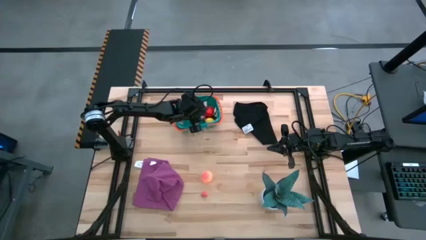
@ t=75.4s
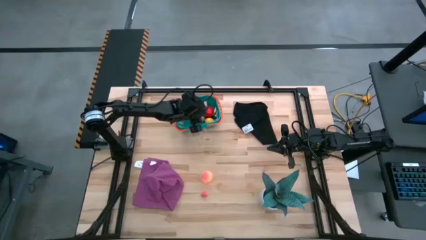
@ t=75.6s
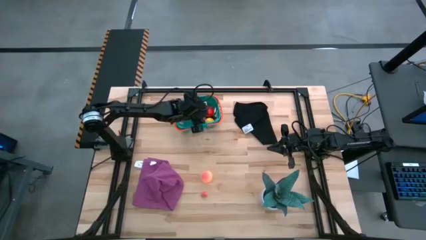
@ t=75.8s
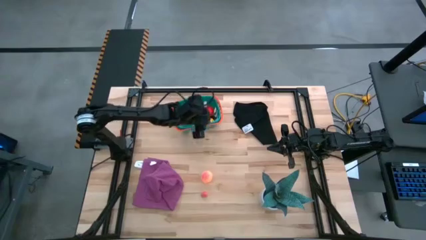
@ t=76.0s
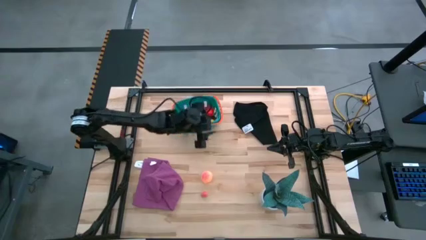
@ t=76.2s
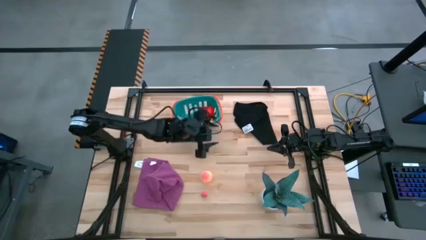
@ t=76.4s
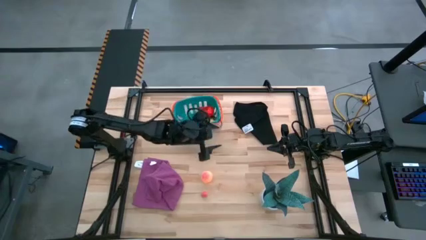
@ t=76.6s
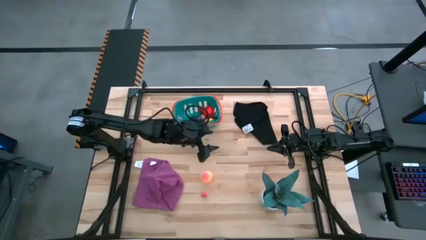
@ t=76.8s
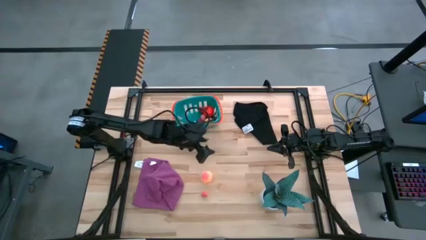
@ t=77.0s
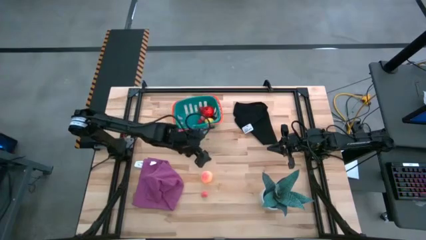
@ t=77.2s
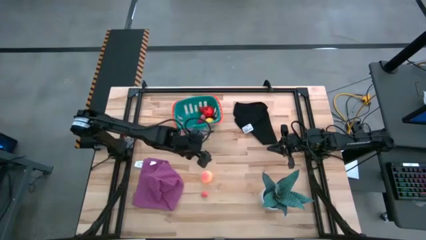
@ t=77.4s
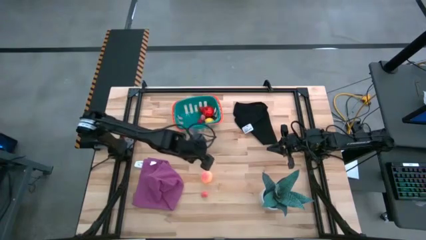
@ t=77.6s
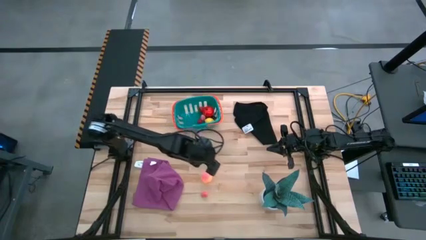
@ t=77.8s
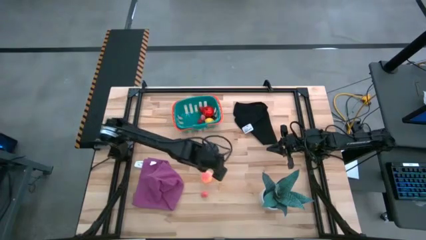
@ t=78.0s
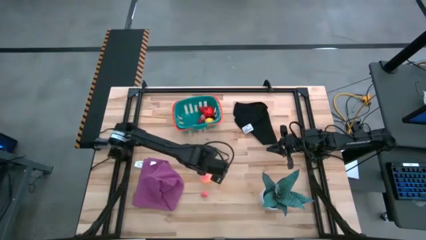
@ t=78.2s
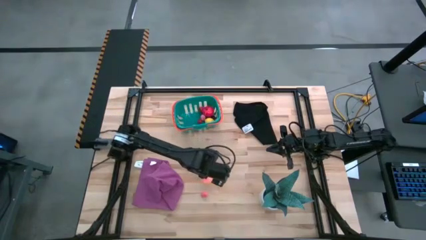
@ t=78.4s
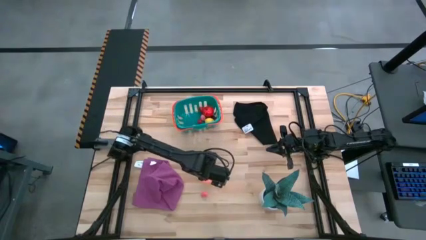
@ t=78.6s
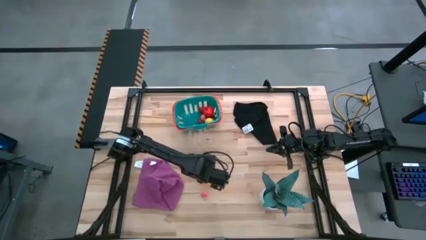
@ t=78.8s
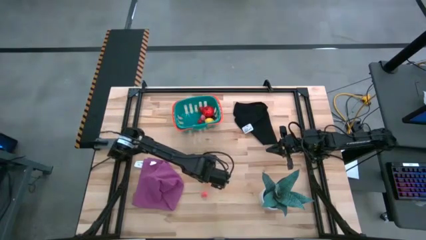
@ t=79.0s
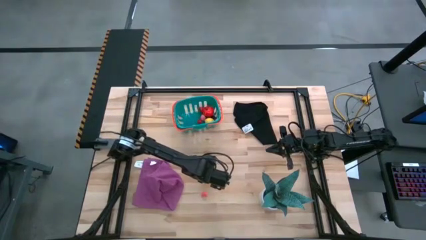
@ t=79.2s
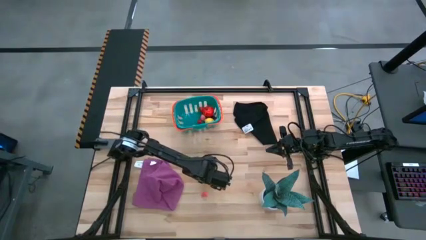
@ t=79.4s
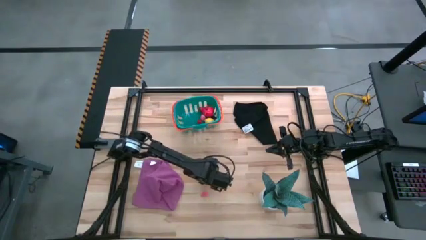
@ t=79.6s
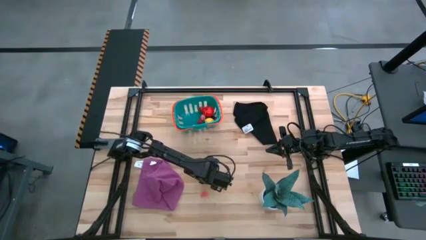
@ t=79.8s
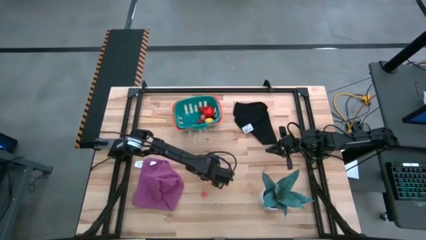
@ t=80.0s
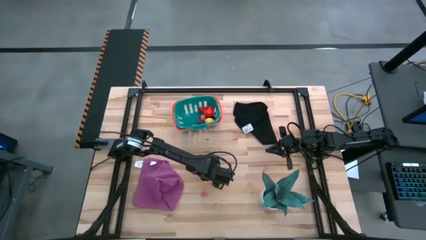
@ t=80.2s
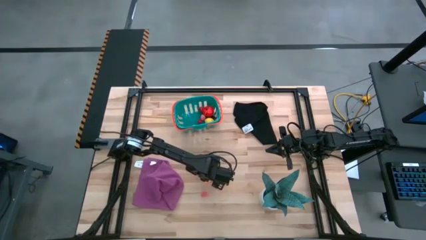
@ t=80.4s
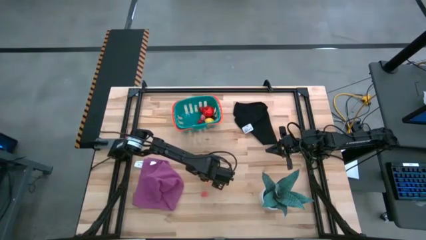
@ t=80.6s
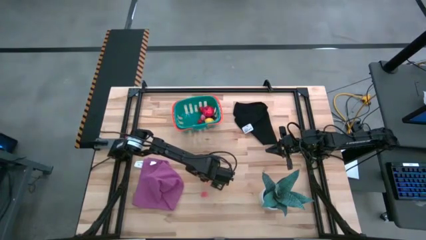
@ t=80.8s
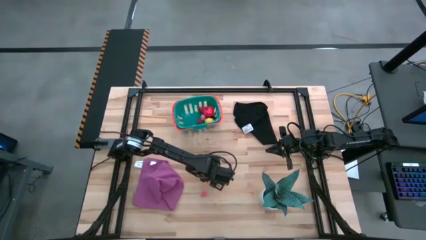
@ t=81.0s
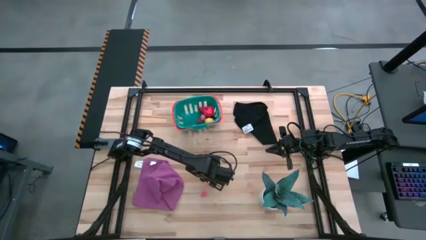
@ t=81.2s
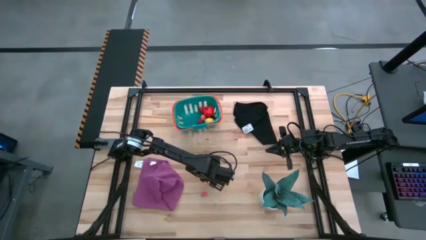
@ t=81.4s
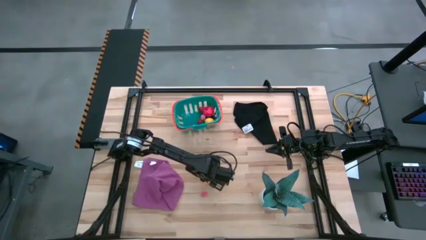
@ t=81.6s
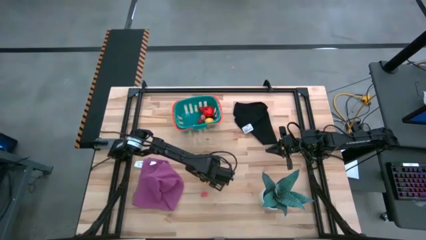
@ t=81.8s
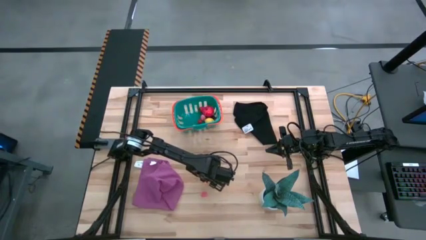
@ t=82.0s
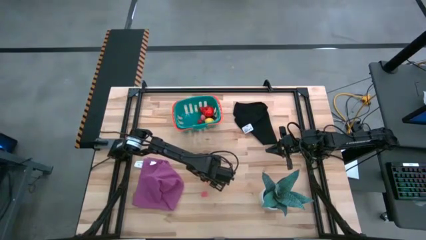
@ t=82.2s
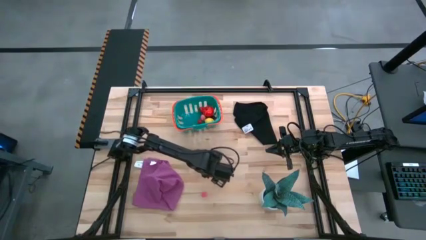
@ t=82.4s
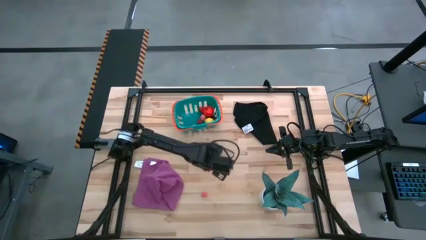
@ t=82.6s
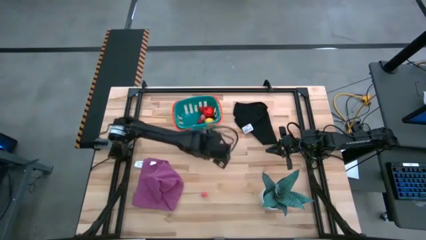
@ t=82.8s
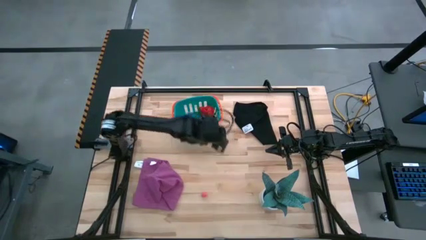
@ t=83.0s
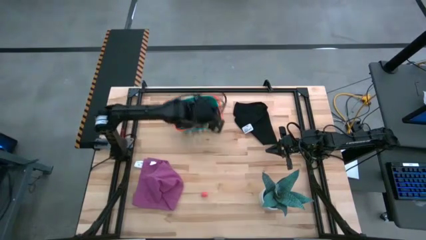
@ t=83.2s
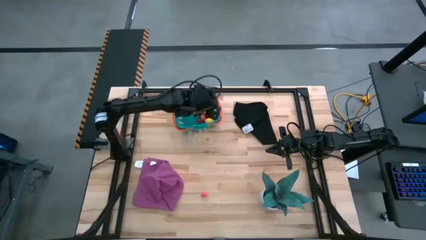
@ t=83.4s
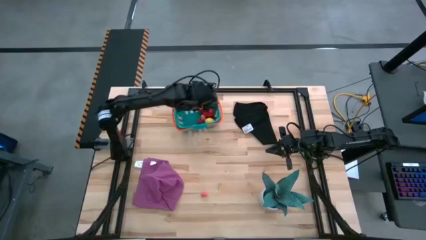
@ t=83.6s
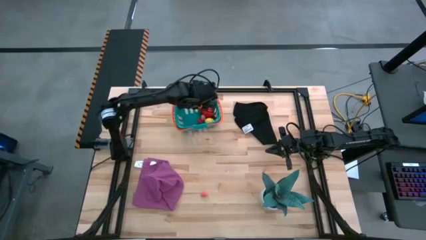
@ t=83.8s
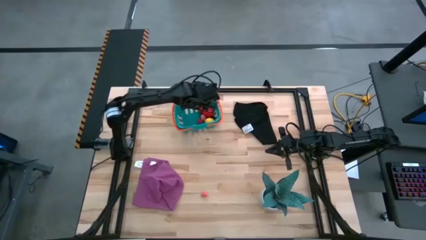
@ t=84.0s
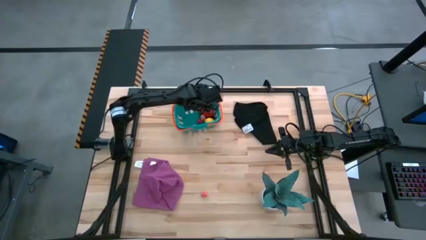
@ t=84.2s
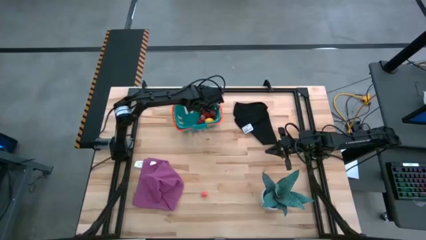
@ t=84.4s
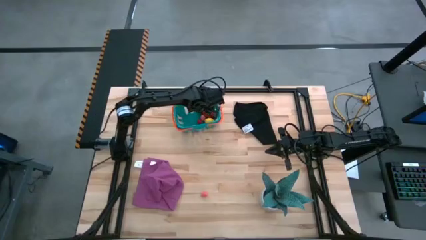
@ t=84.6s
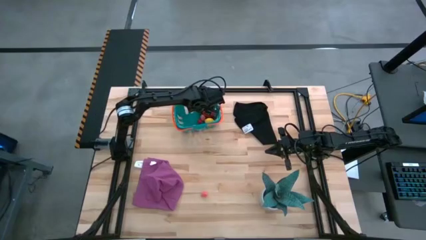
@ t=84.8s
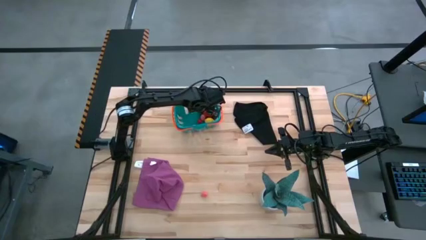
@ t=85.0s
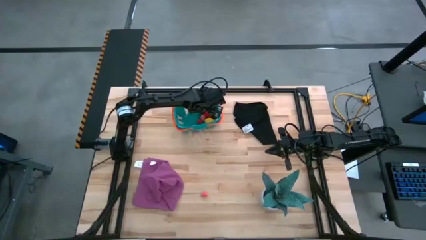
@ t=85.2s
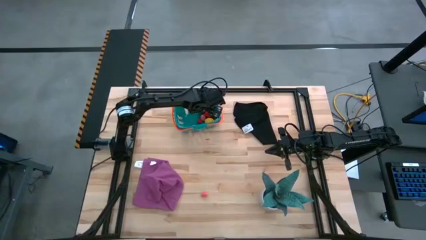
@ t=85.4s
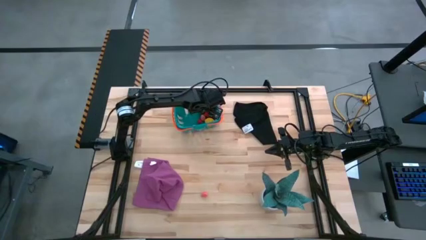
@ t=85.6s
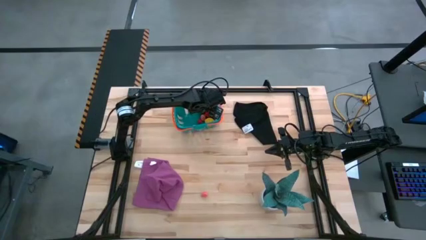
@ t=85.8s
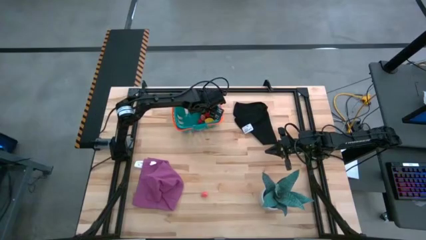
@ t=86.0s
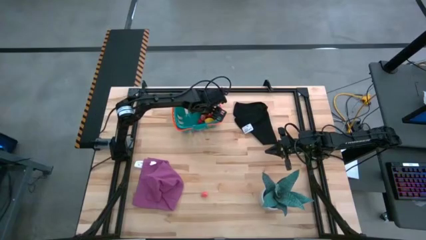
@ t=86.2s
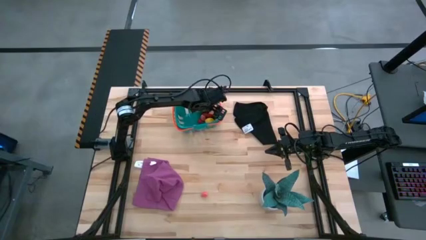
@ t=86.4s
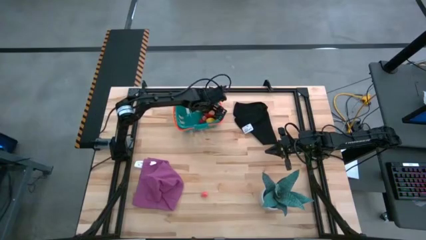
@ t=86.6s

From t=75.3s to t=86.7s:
Task: Pick and placing Produce into tupperware
Put the big pink peach into the basket

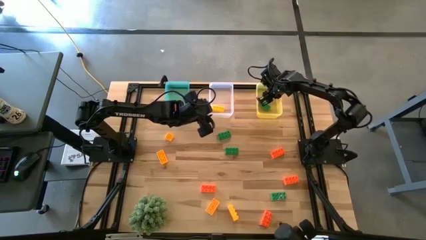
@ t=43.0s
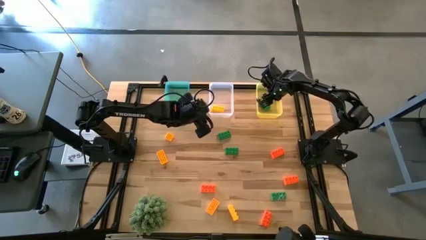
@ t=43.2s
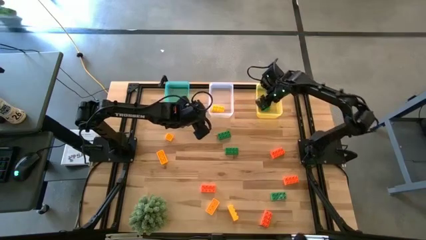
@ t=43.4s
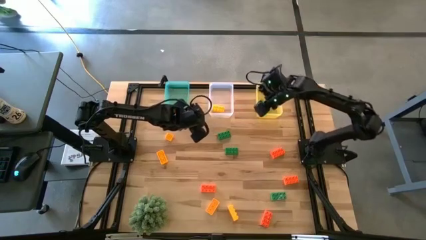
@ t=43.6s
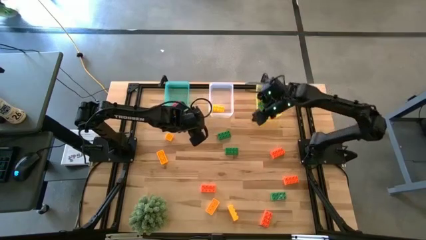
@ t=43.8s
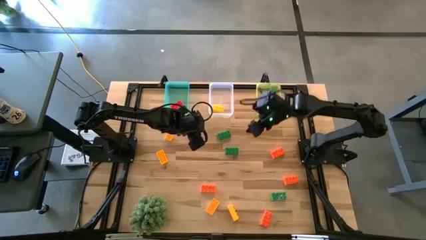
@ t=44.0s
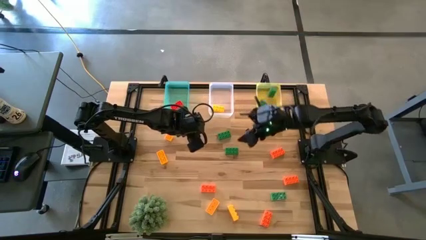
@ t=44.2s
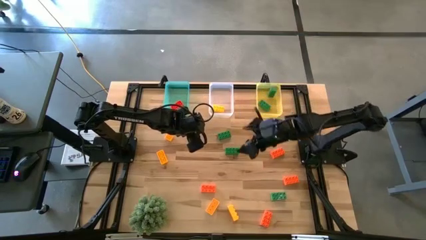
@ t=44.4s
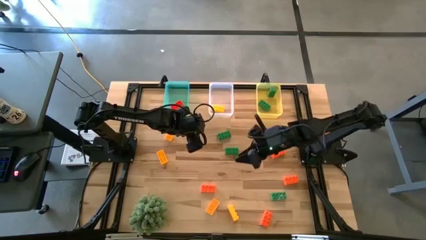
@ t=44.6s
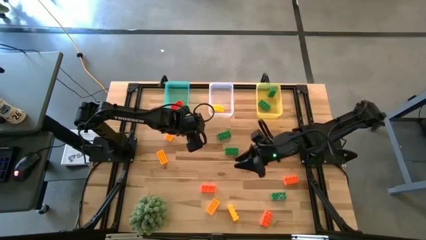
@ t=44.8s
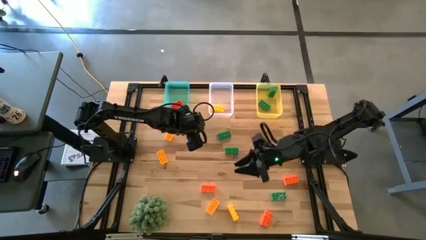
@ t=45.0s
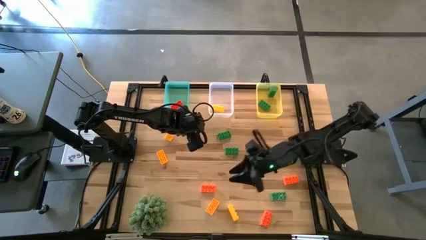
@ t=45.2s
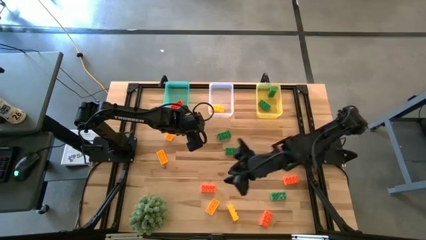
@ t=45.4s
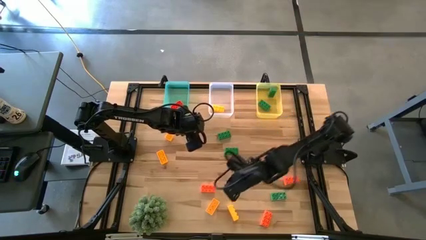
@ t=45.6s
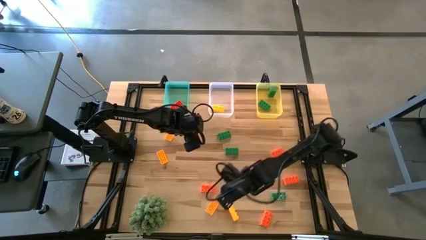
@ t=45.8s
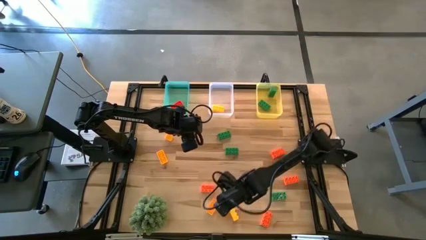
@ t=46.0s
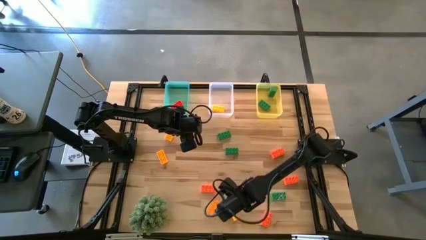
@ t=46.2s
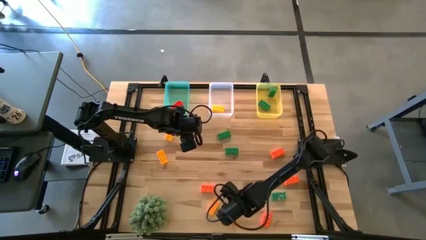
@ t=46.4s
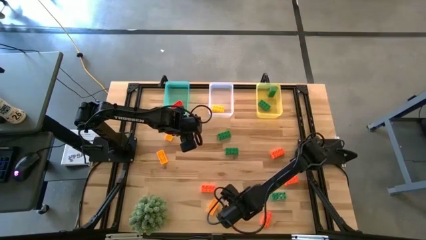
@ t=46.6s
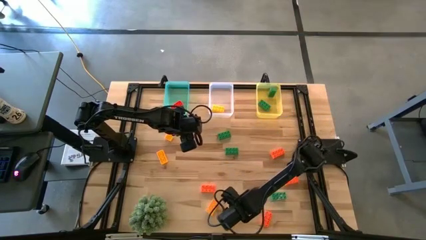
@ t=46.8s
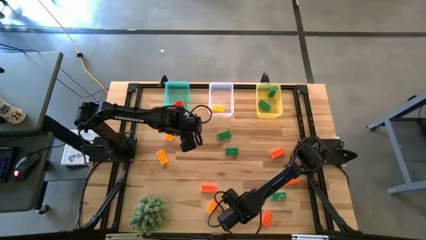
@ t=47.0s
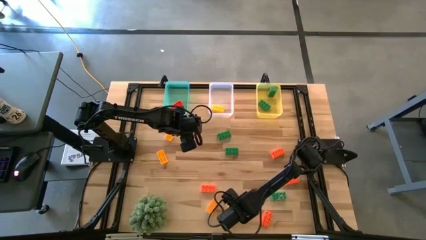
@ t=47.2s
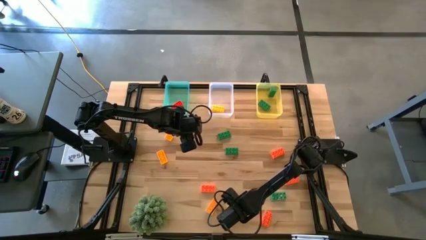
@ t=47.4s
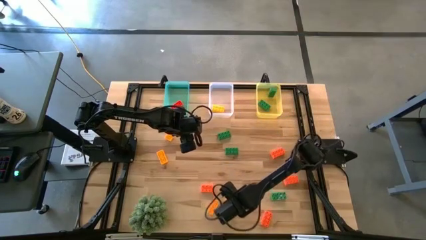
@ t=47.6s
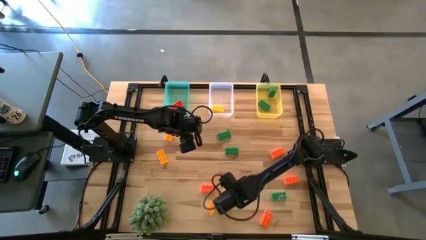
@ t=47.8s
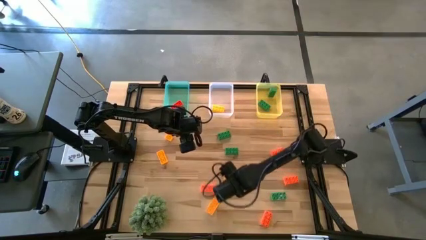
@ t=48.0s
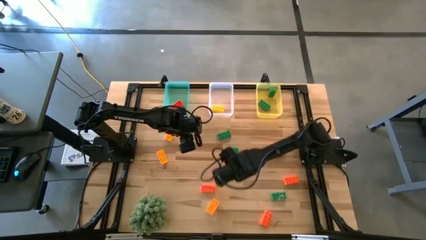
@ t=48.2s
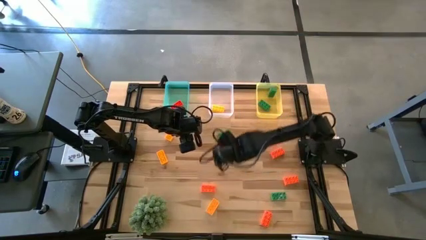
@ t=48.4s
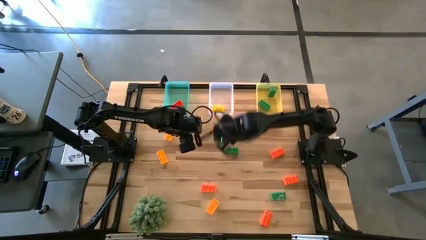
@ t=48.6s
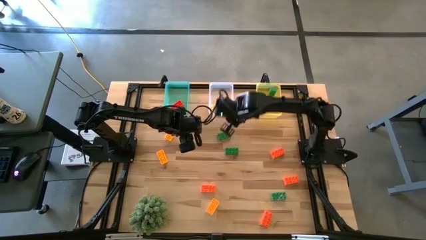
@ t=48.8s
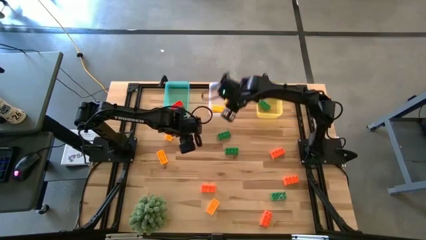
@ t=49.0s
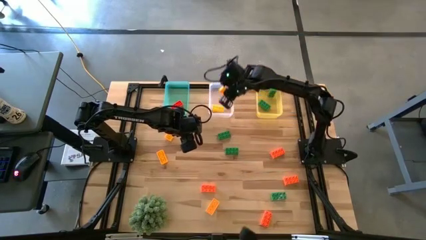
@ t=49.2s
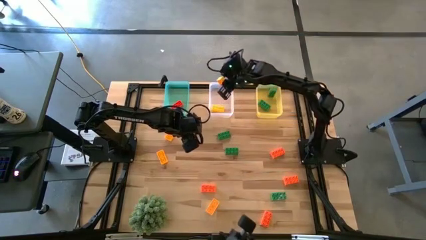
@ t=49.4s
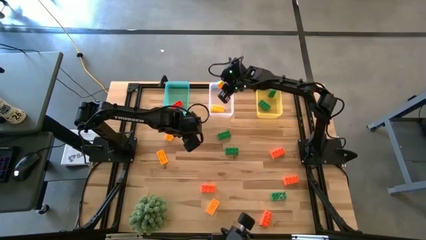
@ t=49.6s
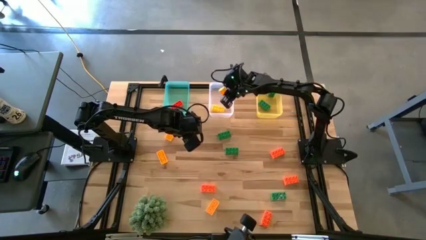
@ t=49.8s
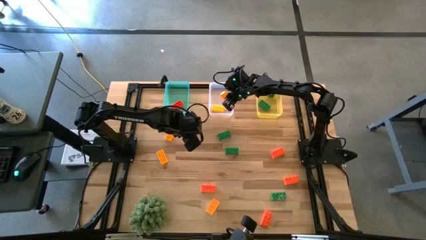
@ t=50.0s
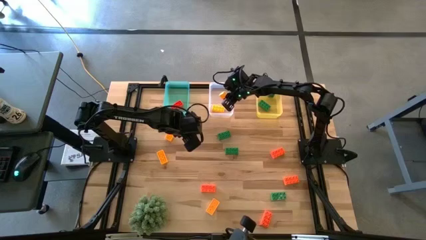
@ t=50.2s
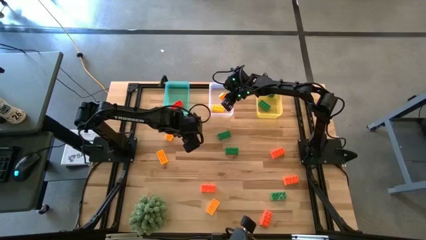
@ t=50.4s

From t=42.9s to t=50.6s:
Task: Sort & place blocks by color
Put the yellow game piece into the white bin
